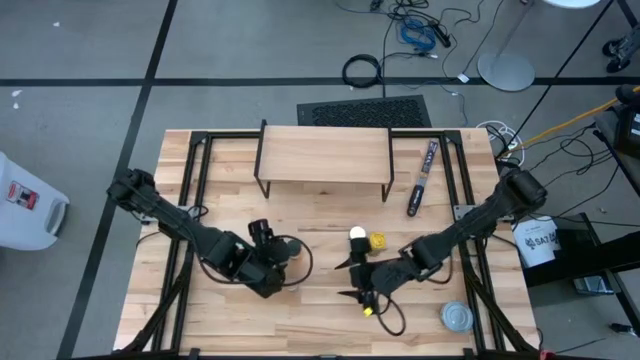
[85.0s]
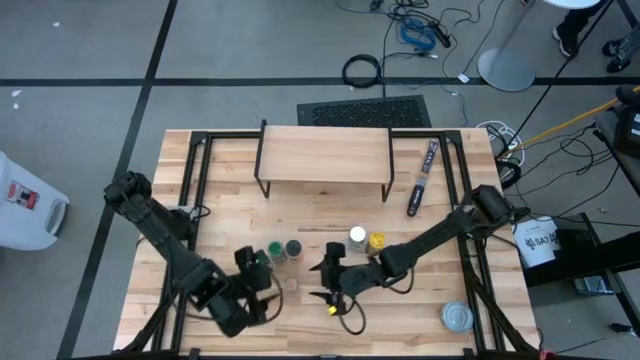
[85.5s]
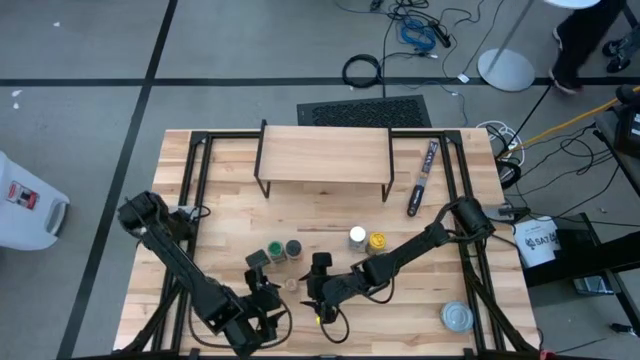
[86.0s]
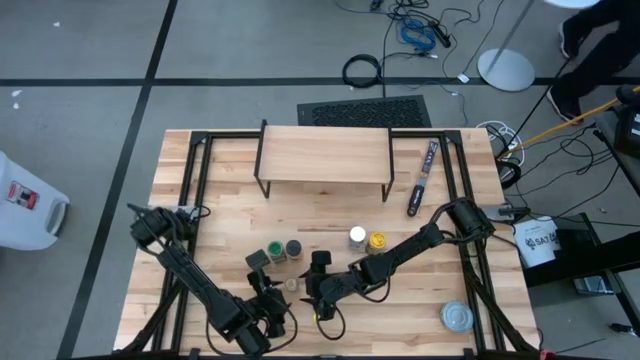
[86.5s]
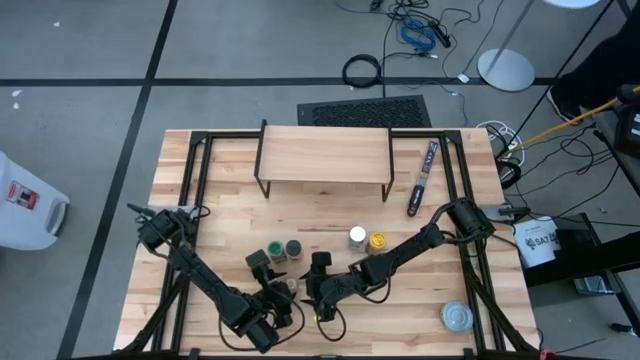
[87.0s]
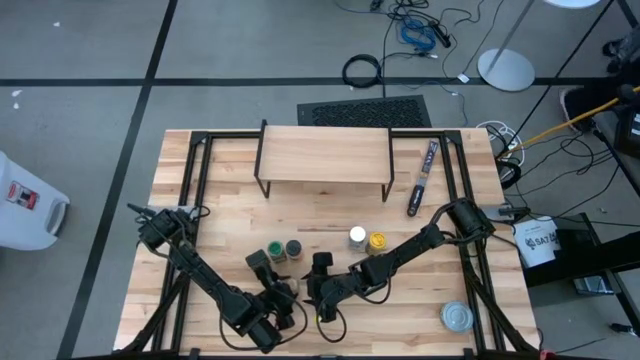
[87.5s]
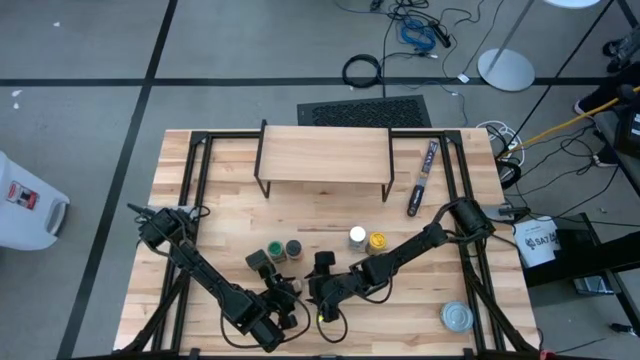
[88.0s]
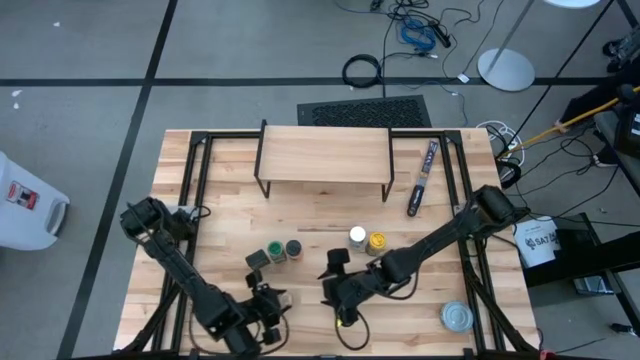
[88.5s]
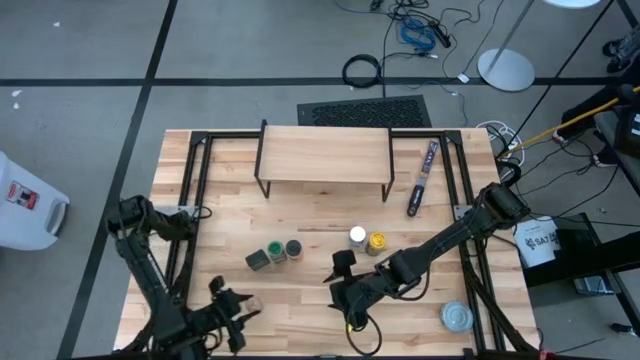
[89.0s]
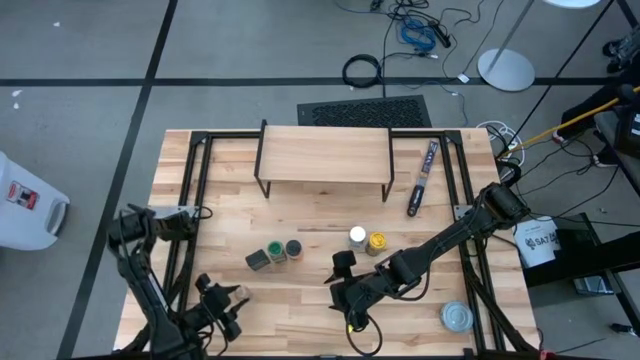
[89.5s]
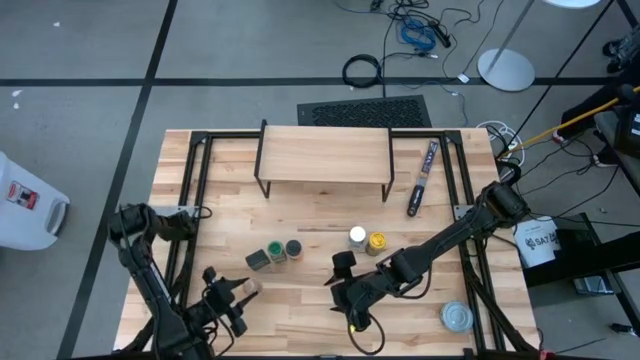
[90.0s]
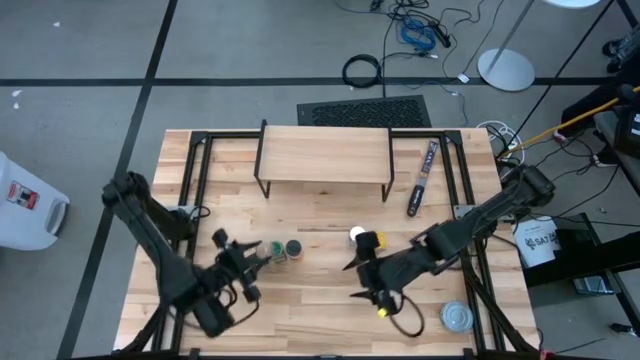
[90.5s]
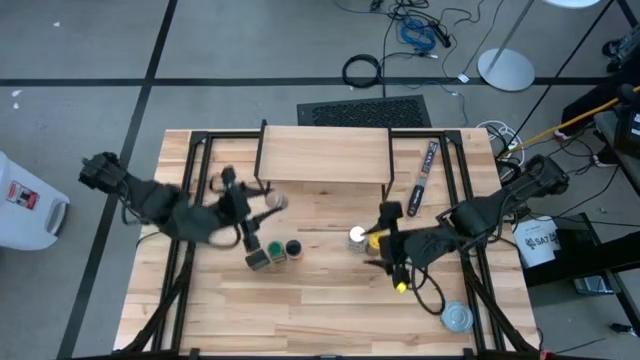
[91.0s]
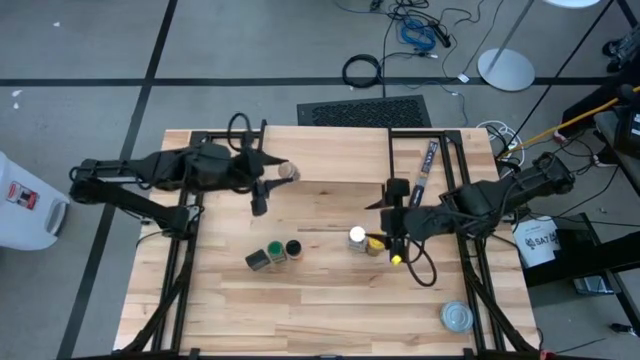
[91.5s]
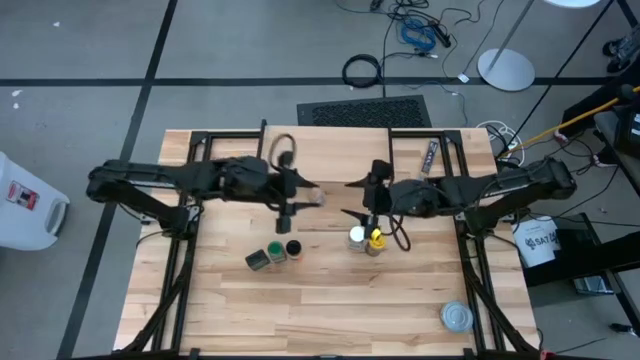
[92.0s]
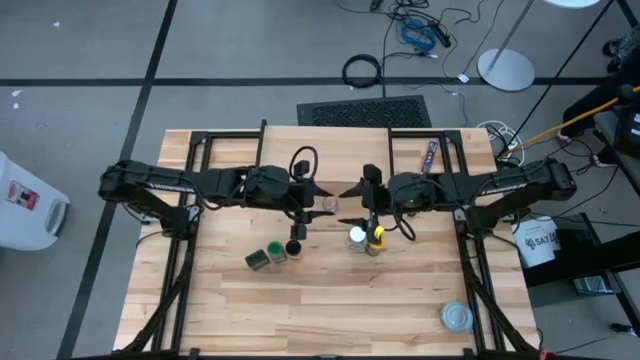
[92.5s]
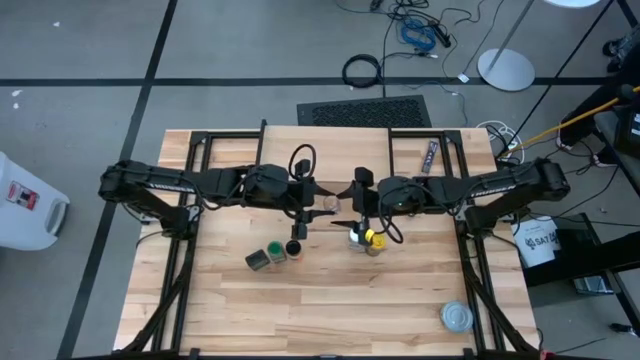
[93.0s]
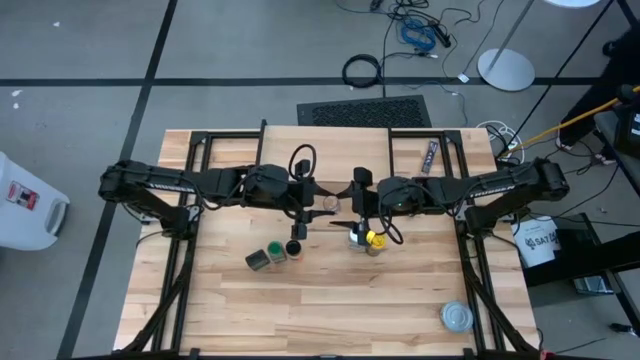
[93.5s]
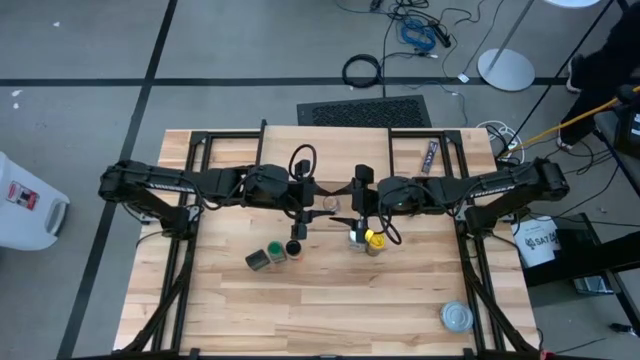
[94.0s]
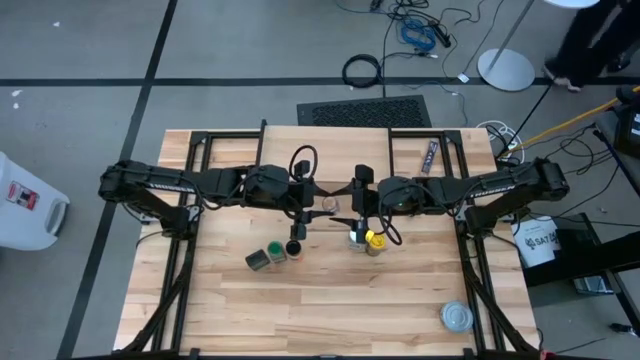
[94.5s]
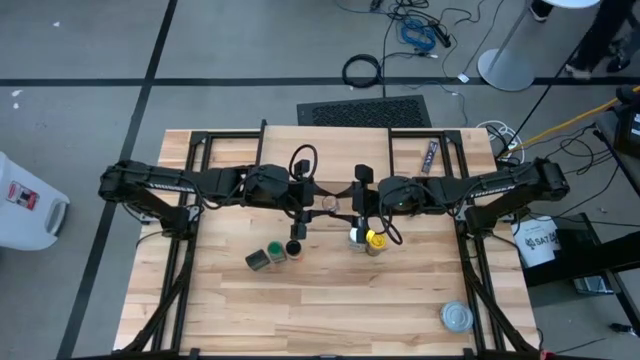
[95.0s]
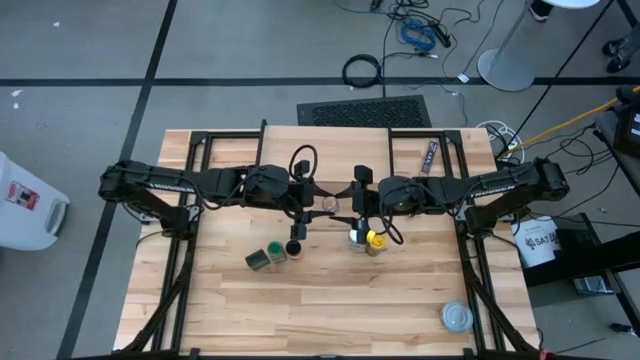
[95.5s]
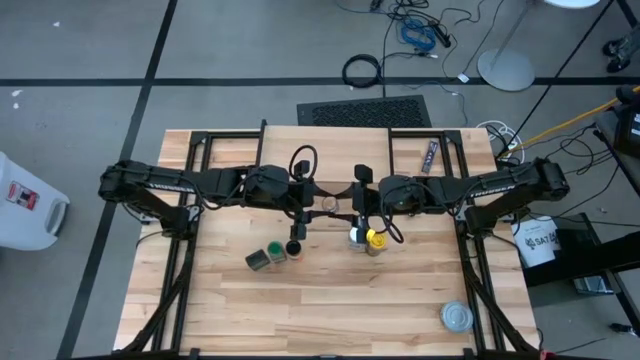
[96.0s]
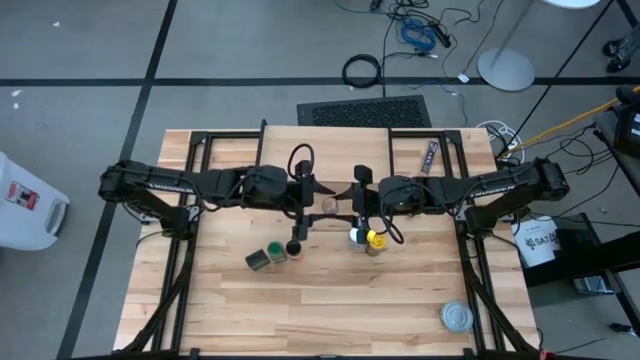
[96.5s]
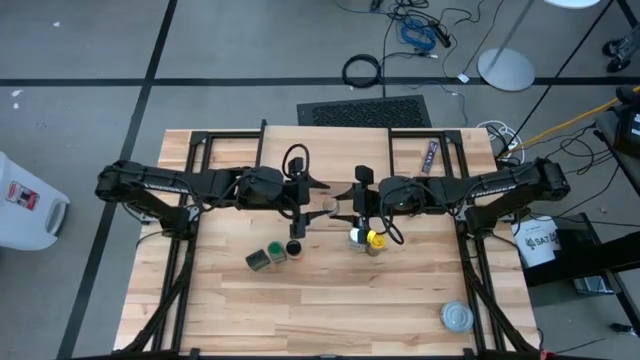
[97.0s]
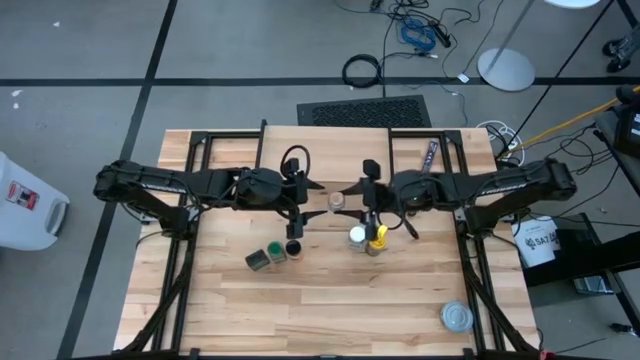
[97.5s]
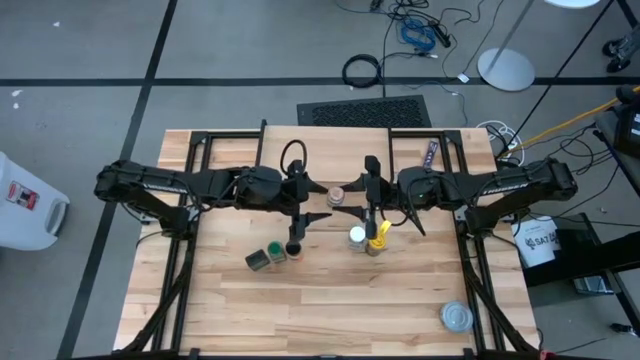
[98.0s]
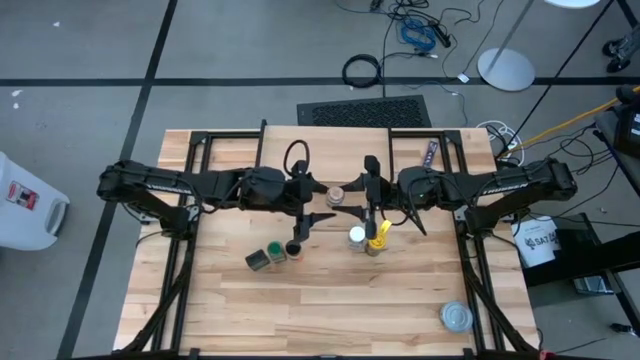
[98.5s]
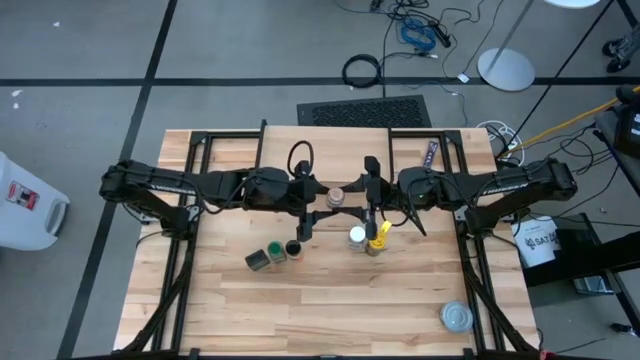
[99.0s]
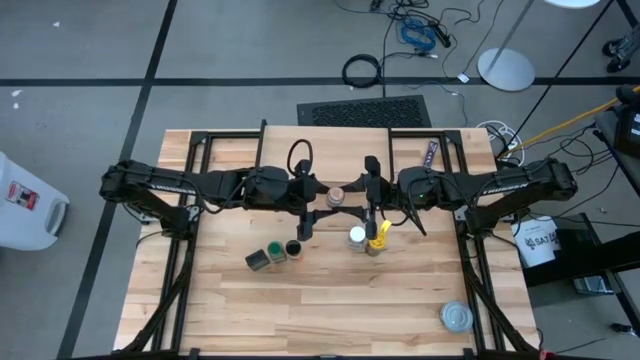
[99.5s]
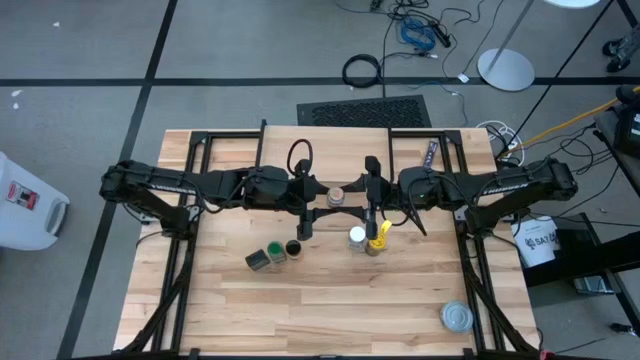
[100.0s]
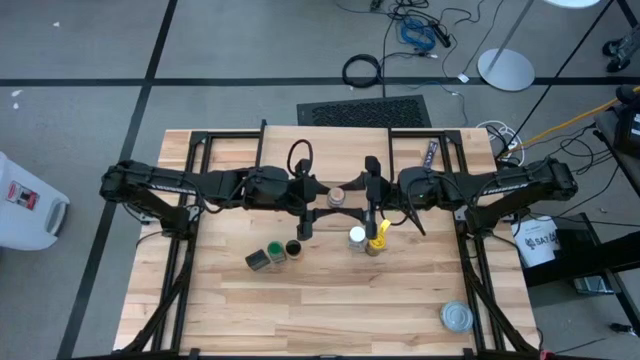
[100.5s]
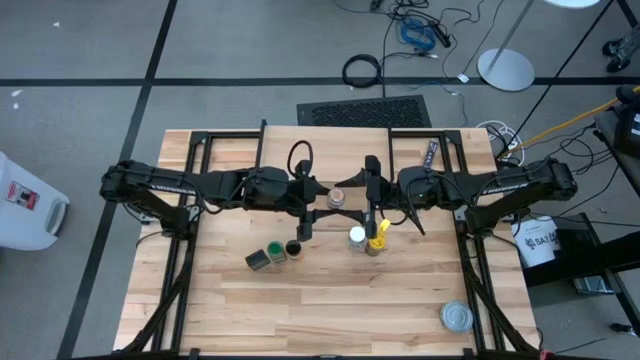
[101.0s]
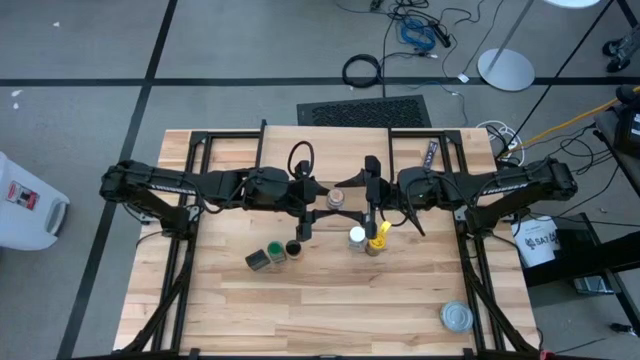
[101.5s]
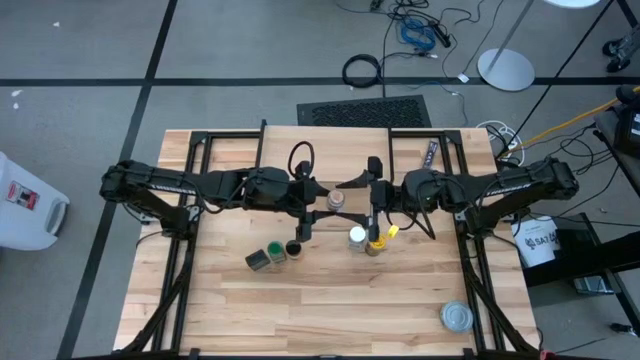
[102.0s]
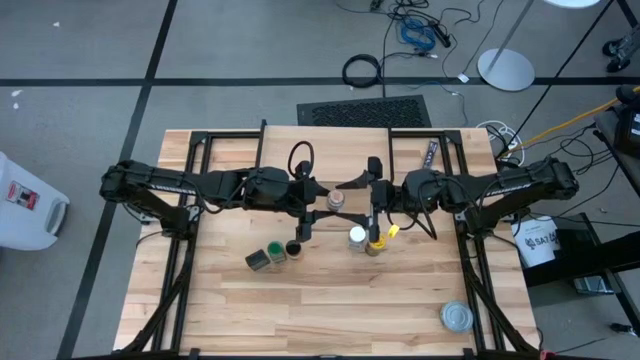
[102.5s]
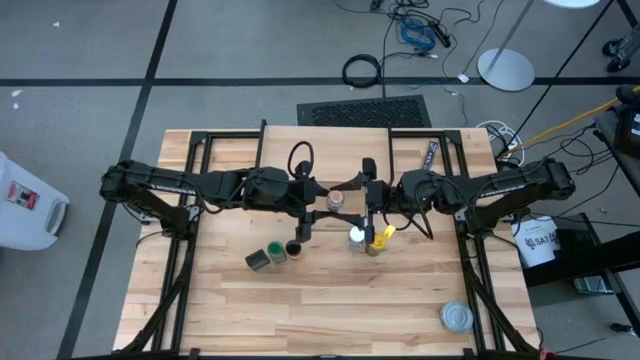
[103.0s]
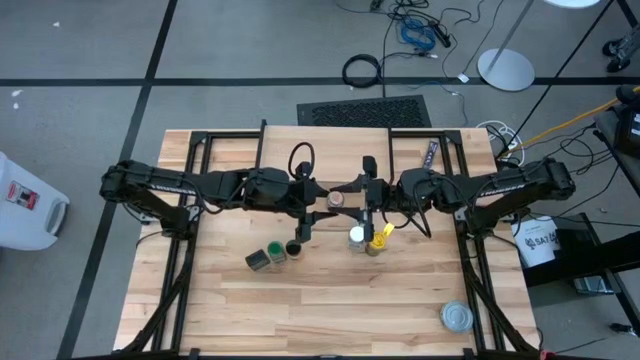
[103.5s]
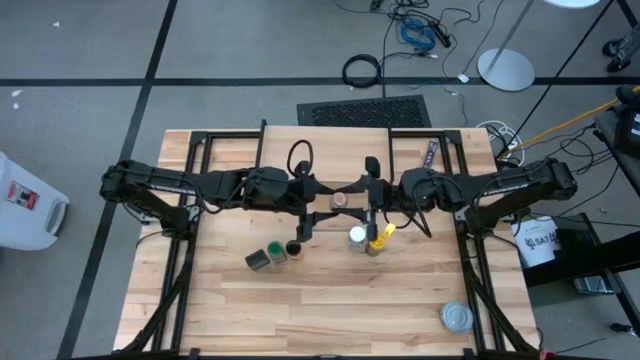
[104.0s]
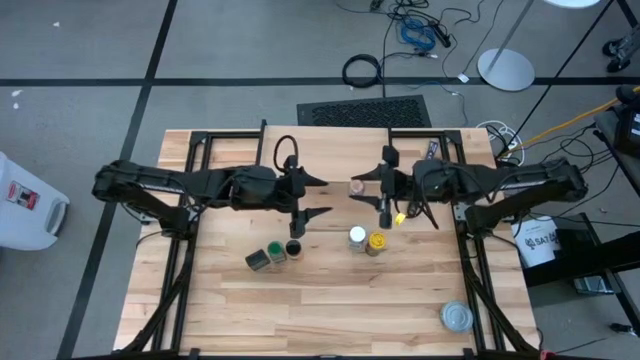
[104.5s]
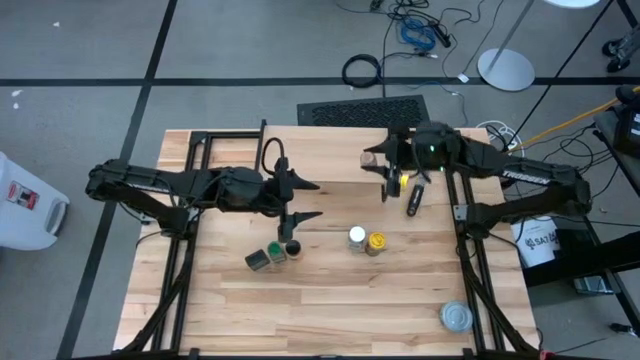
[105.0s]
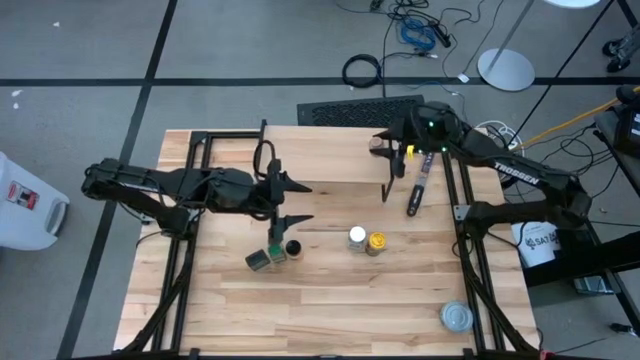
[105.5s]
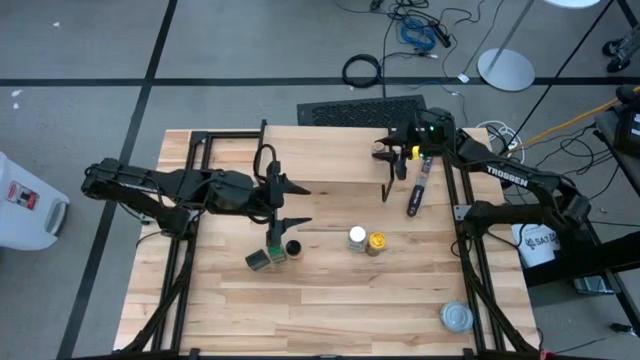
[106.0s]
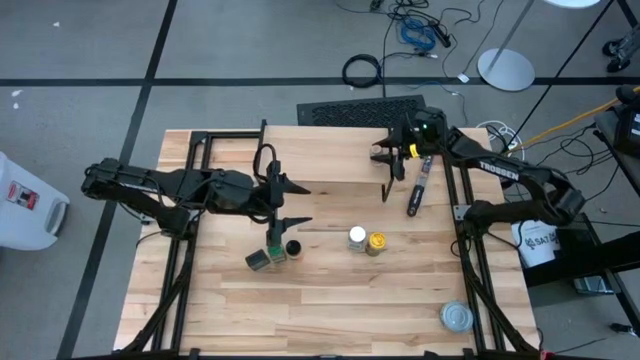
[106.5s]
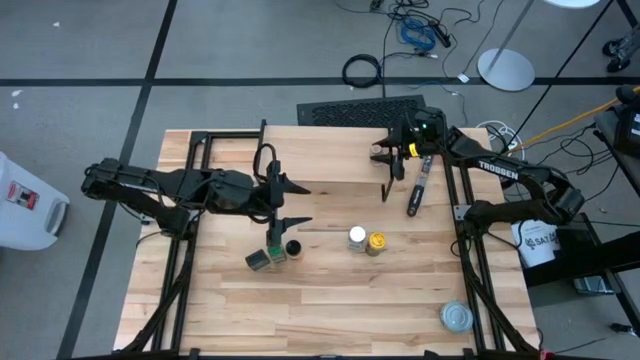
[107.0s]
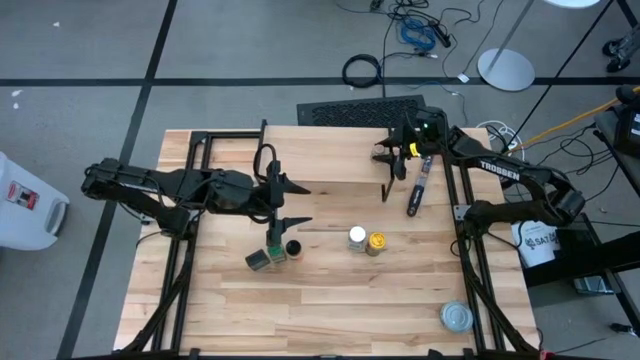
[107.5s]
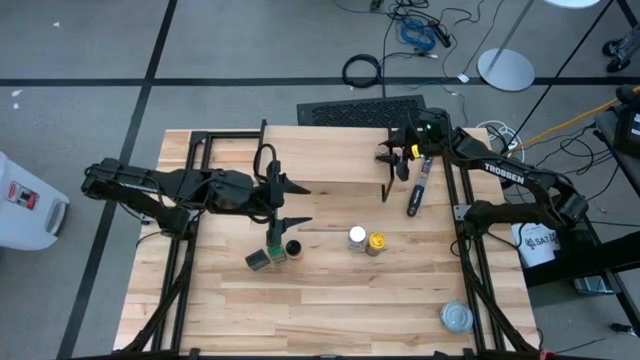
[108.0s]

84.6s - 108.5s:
Task: Shelf spices
Put the light brown seasoning bottle on the shelf
